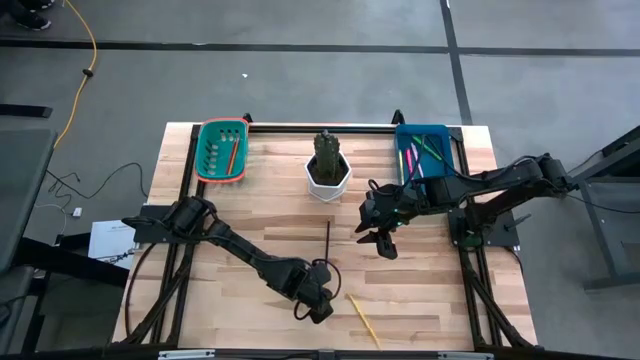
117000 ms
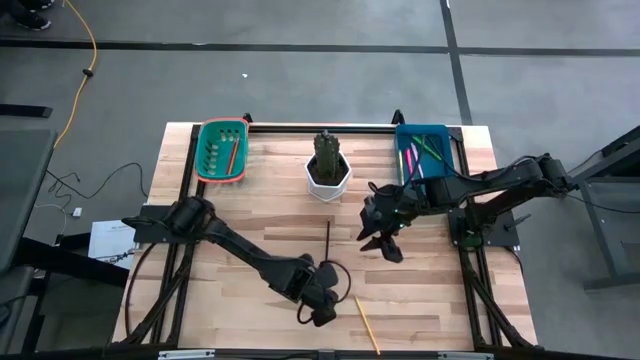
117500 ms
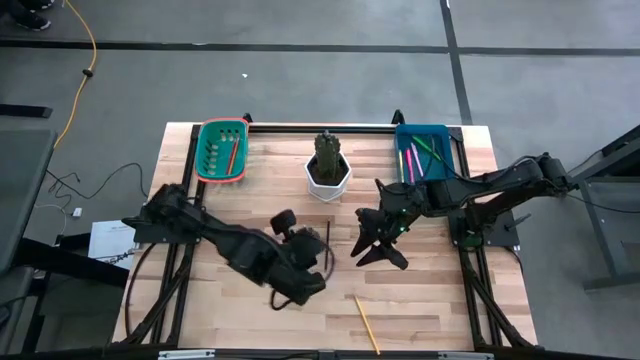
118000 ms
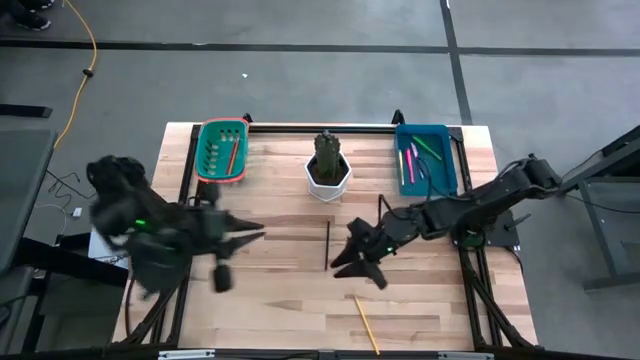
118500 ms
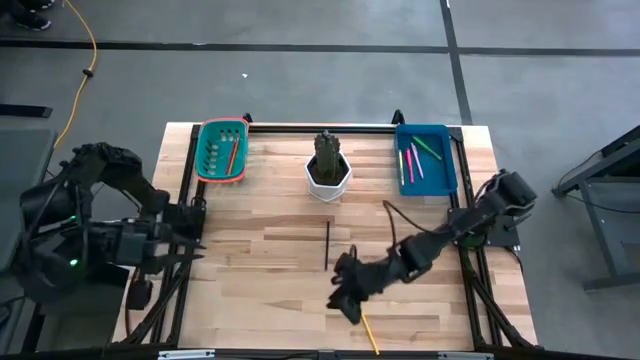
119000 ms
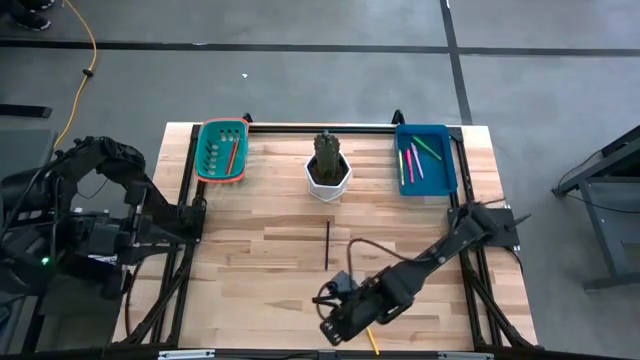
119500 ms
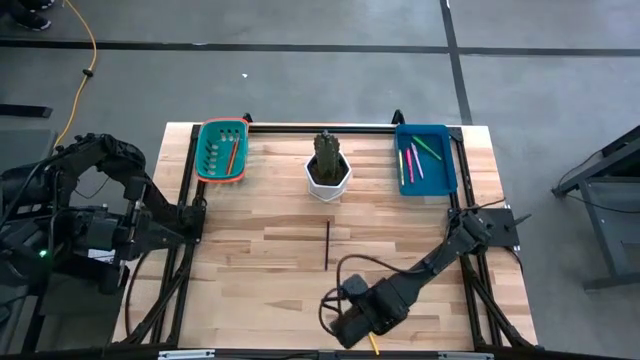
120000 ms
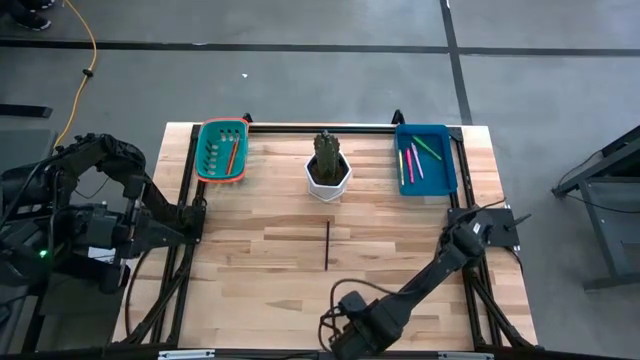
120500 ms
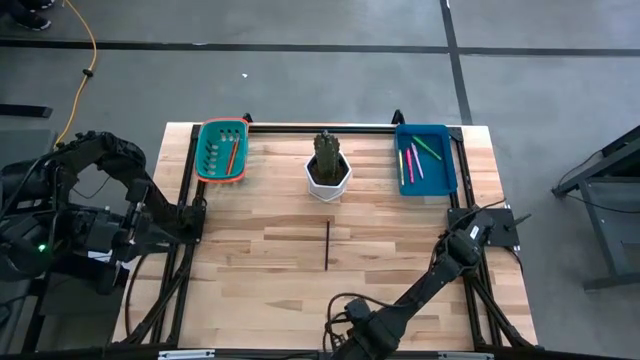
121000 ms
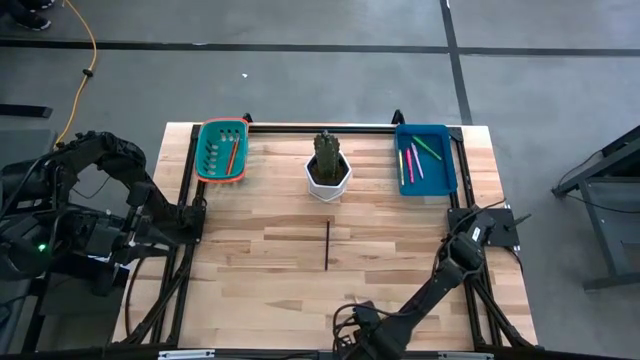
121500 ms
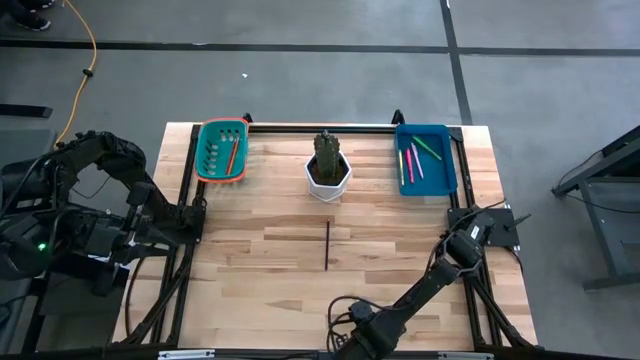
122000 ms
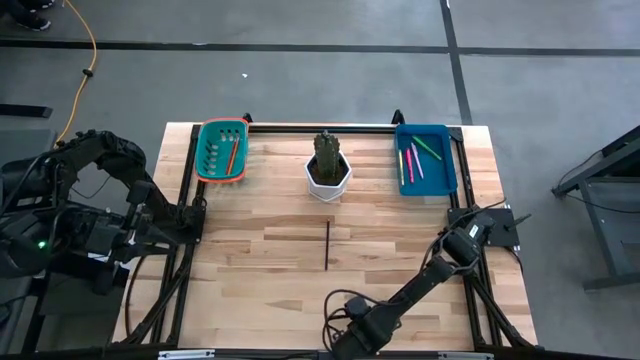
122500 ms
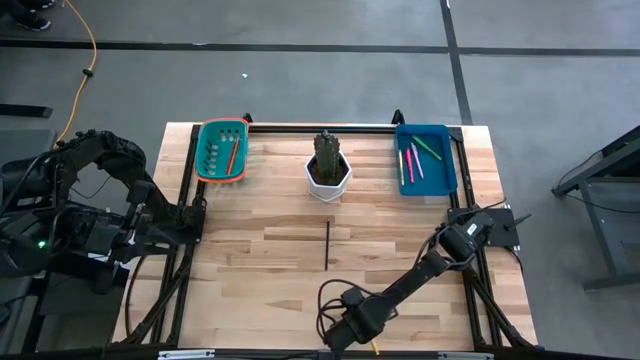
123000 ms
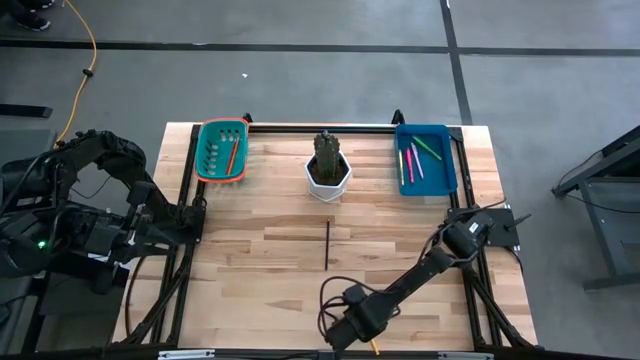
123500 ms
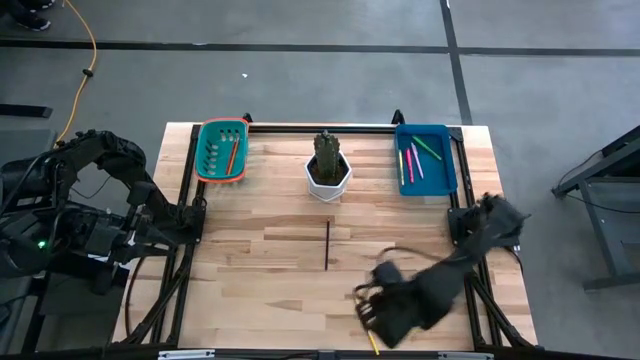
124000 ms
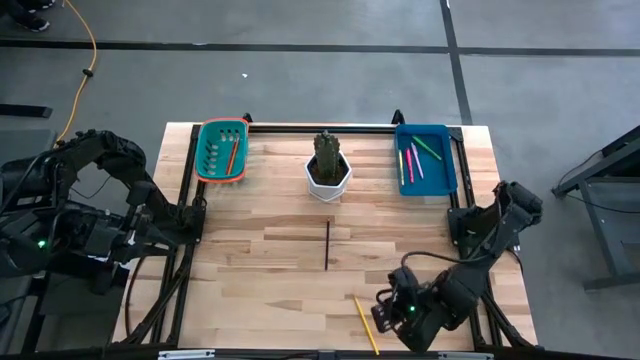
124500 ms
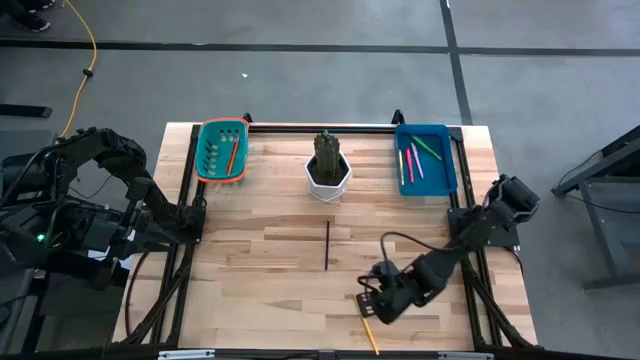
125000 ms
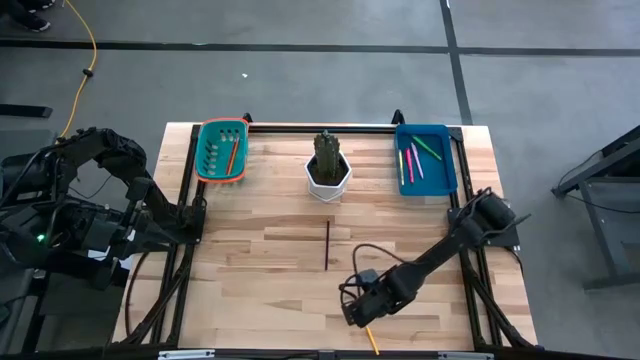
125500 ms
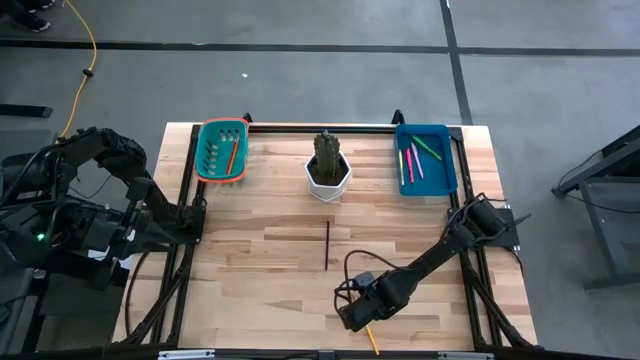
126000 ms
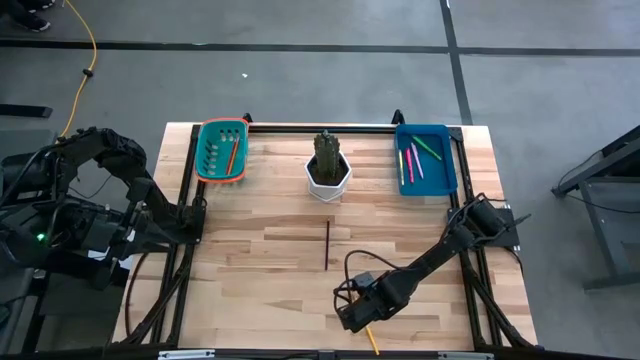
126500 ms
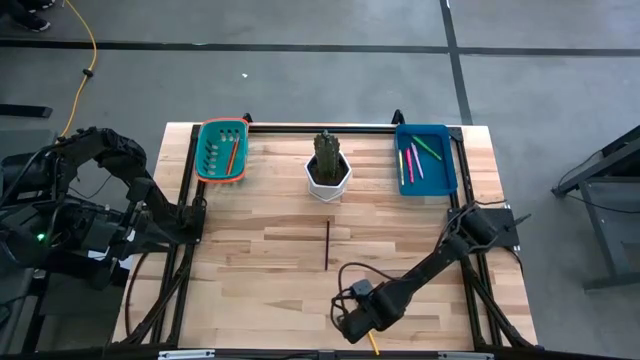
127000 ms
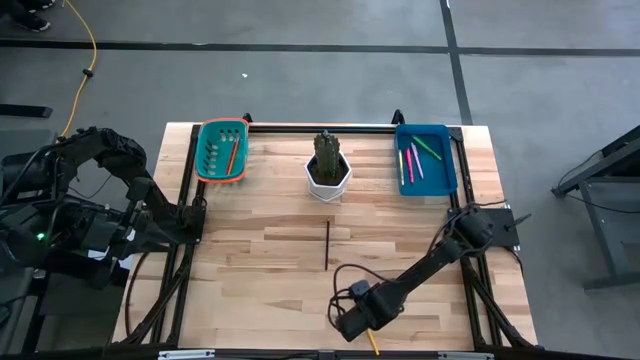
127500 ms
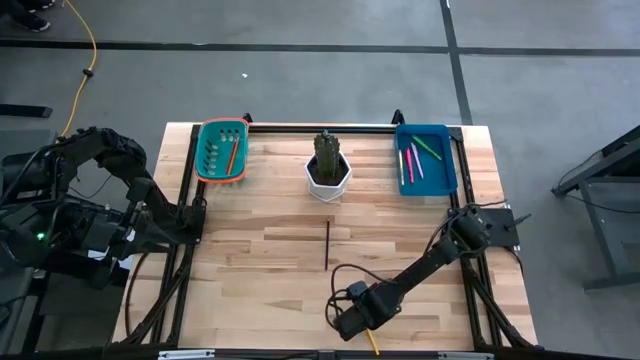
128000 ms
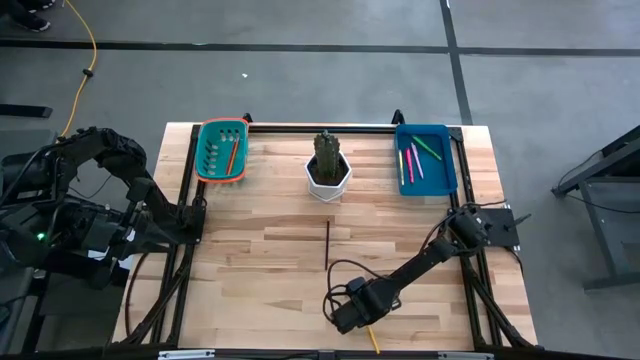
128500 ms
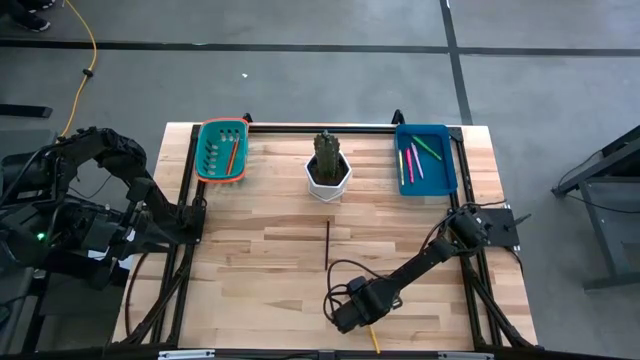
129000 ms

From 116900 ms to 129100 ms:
Task: Sort pens & pencils
Put the yellow pencil into the green bin

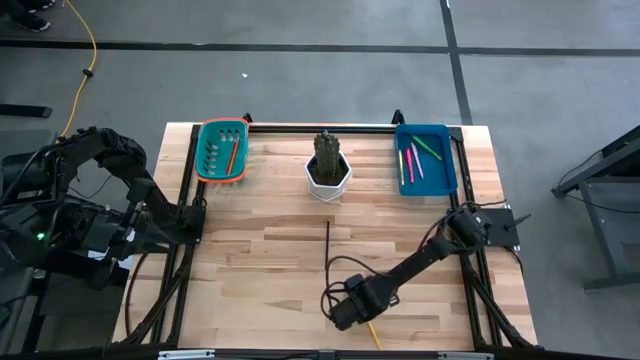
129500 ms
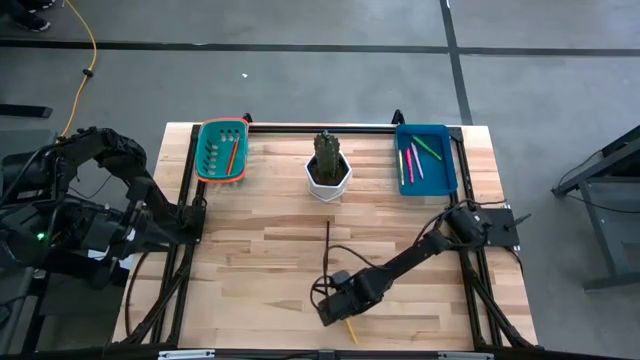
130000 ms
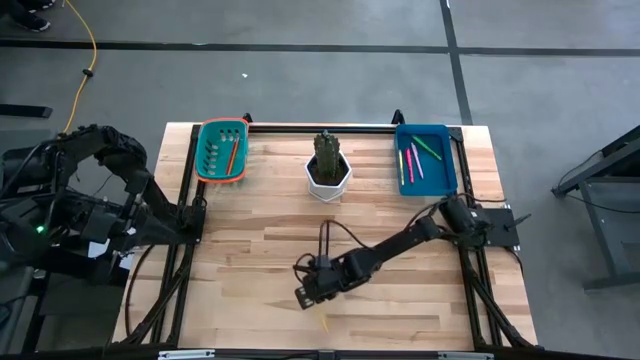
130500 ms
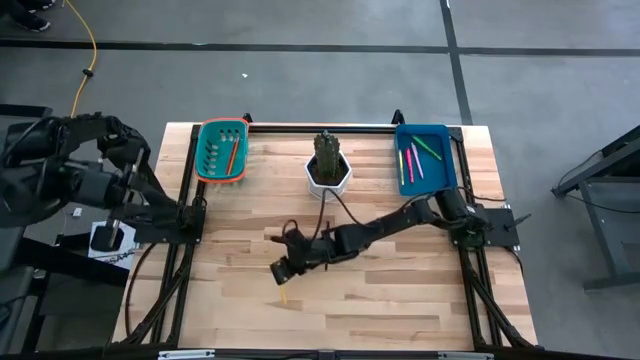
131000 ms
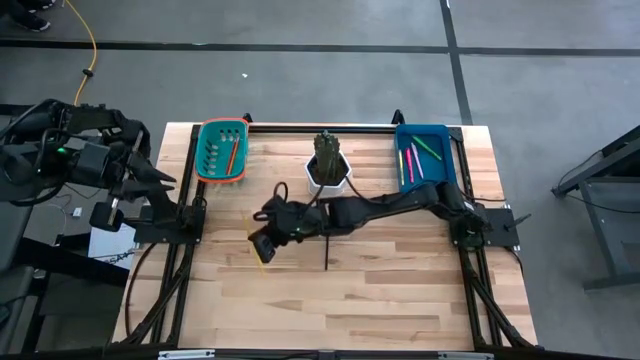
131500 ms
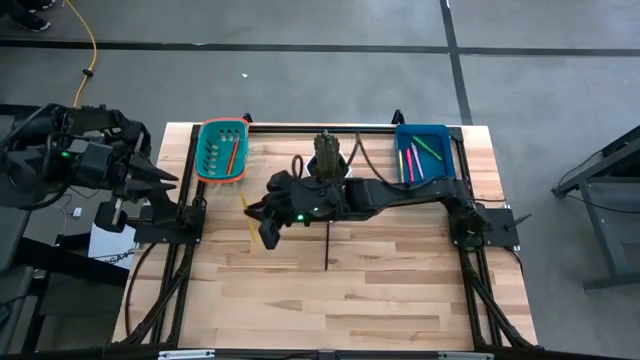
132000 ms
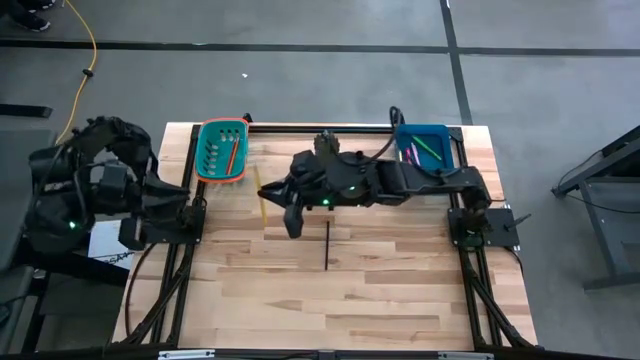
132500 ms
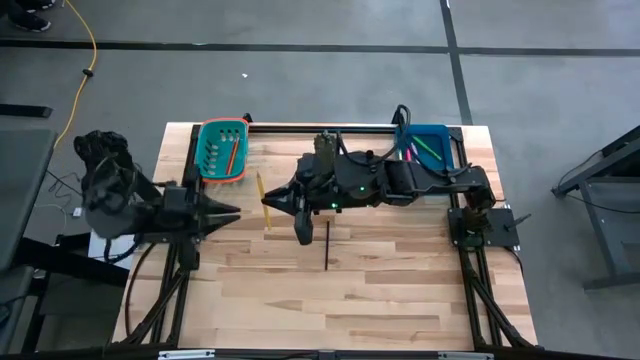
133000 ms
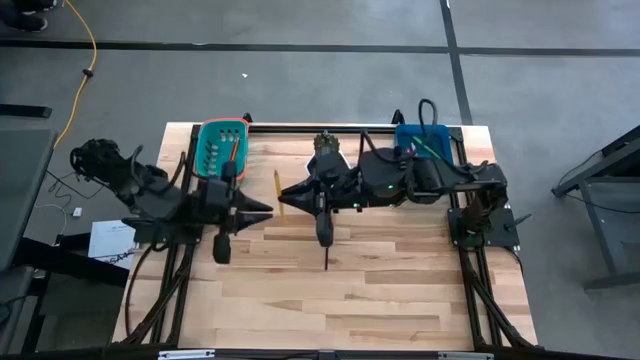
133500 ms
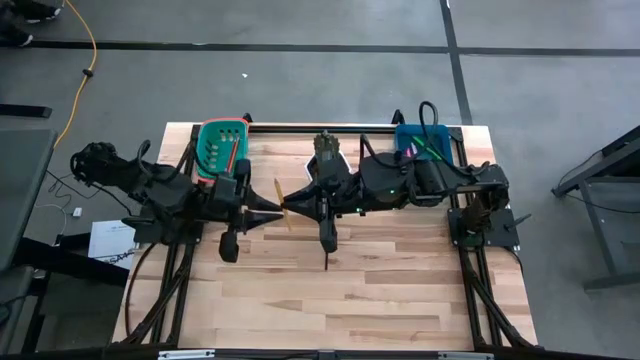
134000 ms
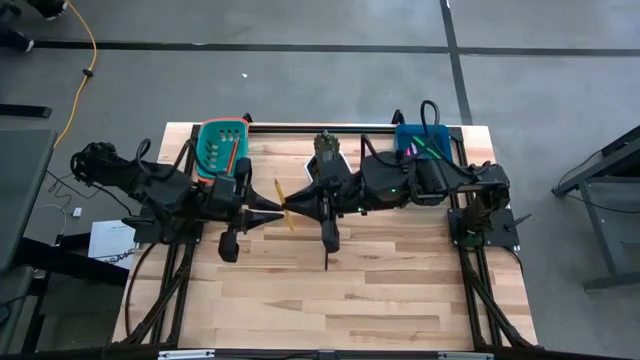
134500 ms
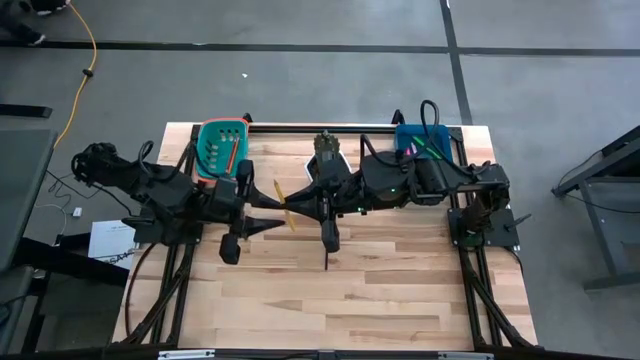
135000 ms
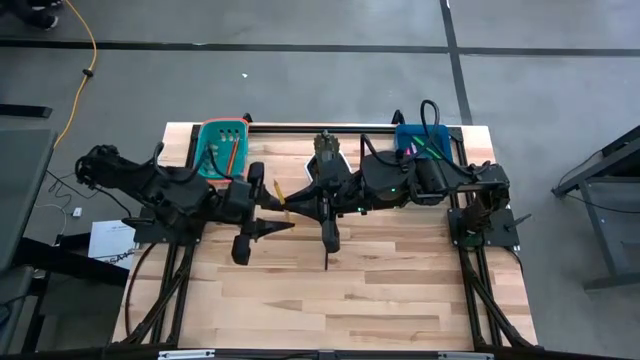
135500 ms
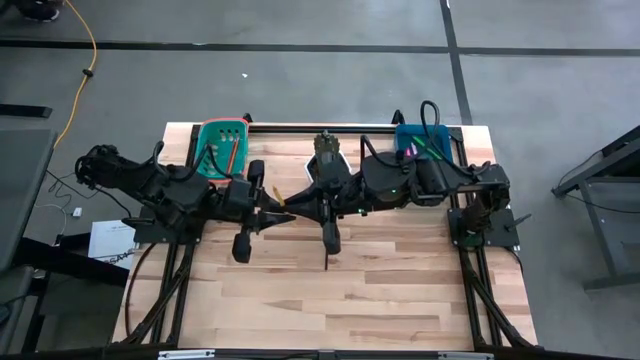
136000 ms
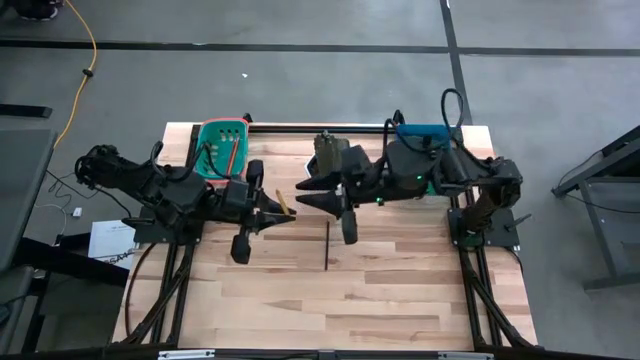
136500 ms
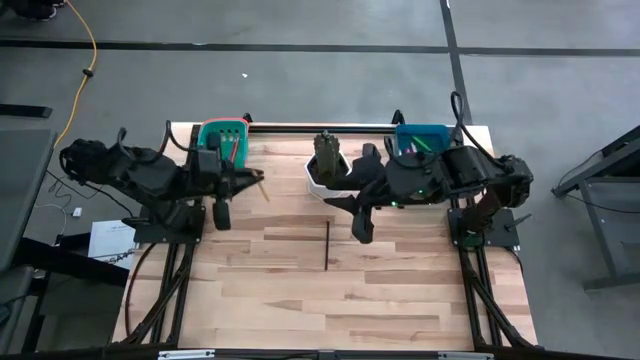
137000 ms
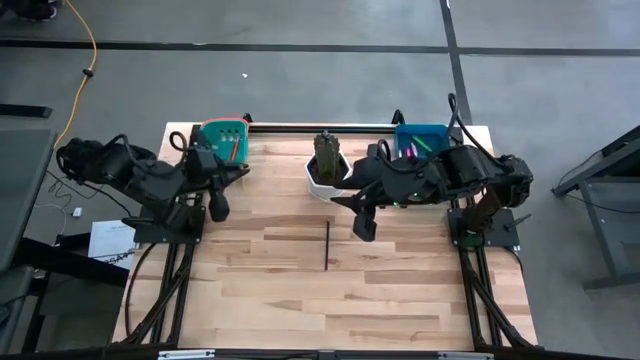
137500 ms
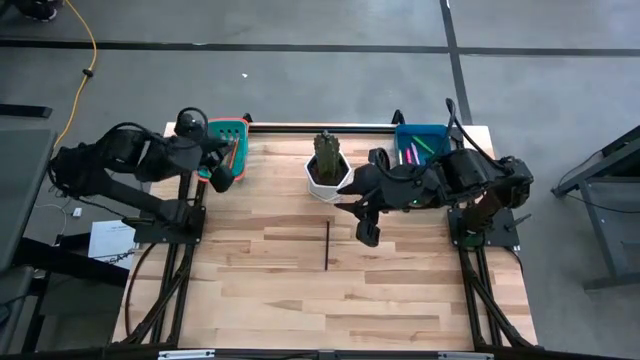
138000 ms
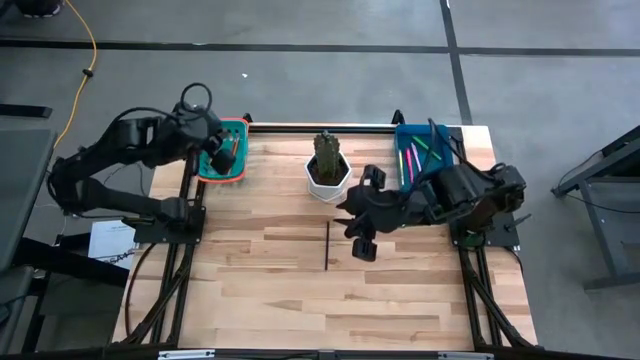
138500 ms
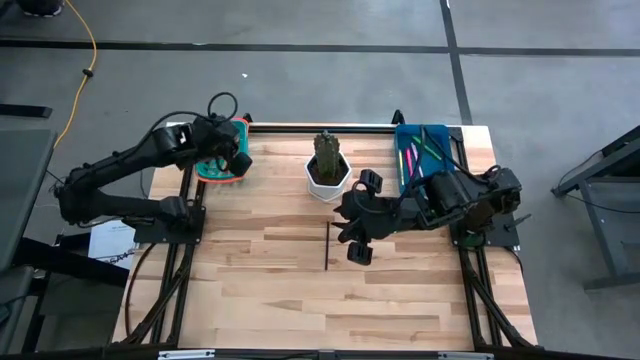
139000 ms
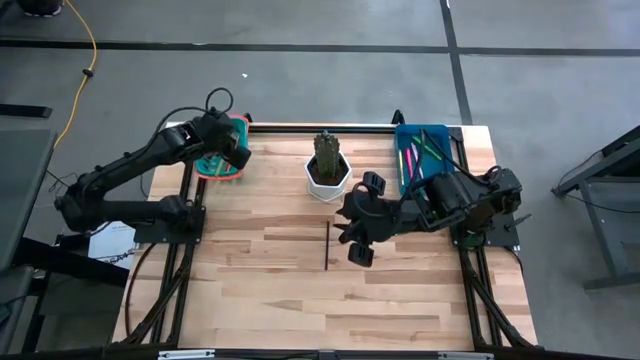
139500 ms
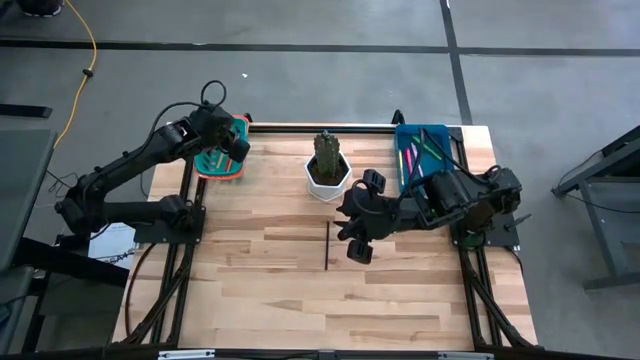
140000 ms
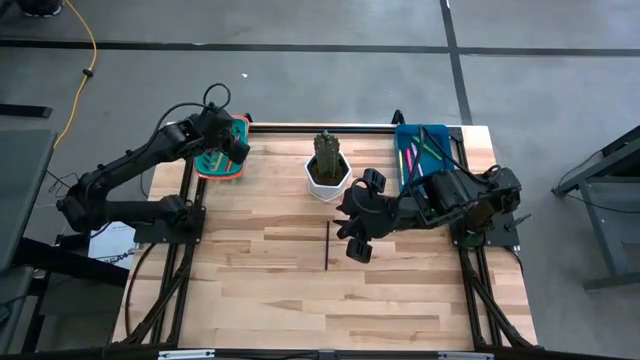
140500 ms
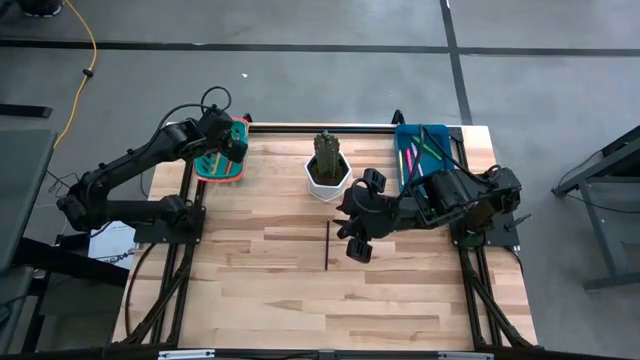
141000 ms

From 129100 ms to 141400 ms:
Put the yellow pencil into the green bin
